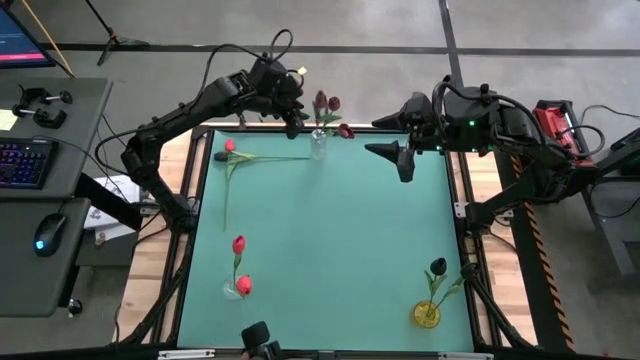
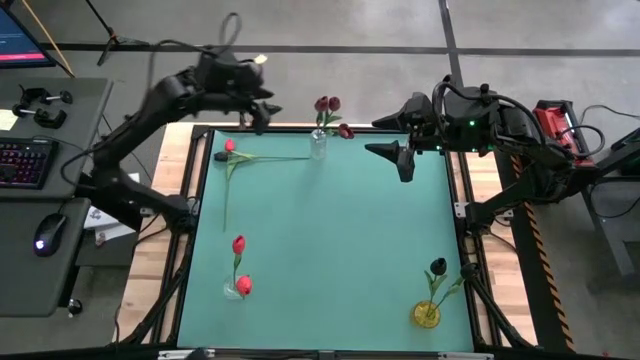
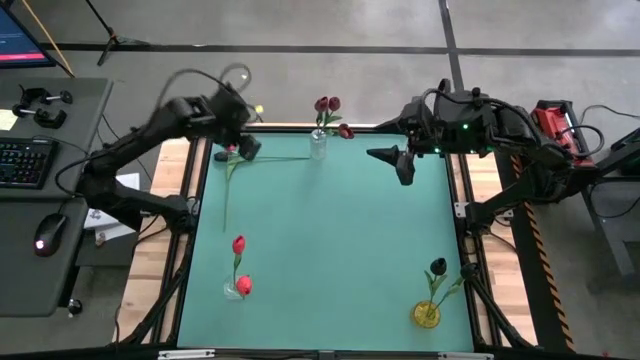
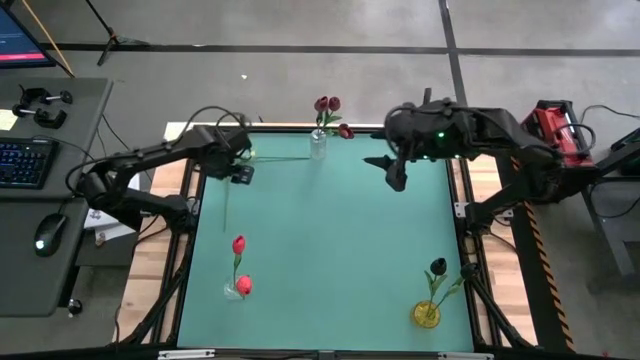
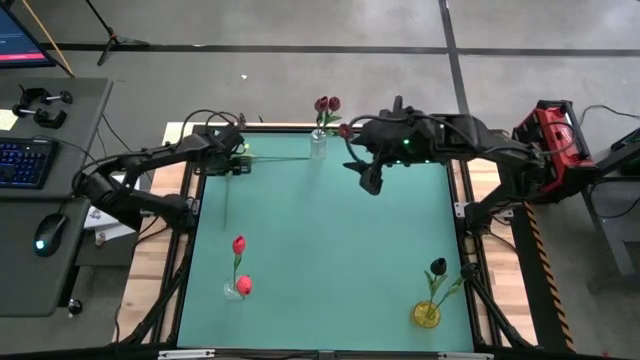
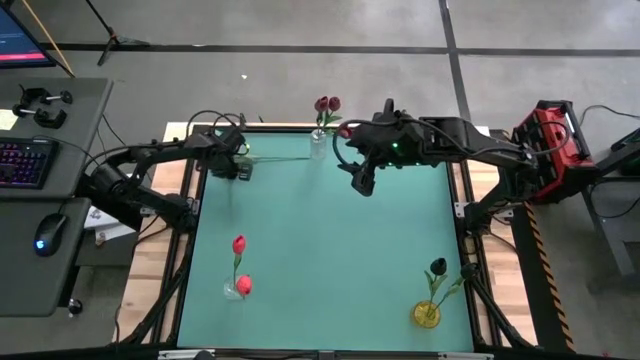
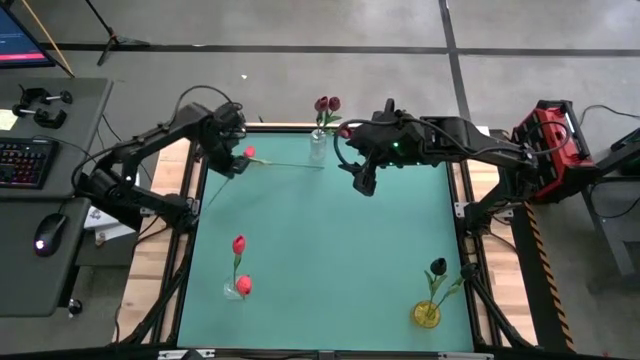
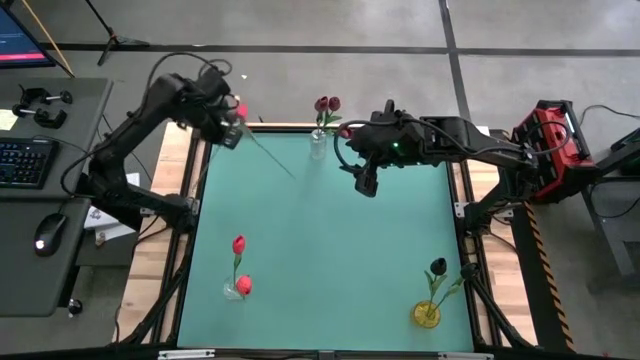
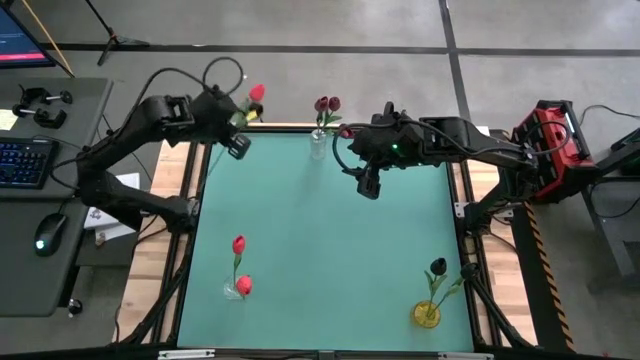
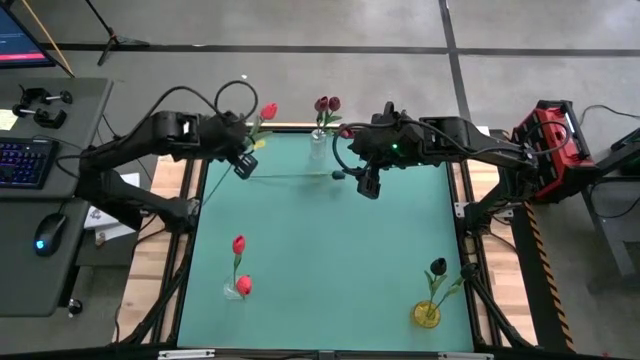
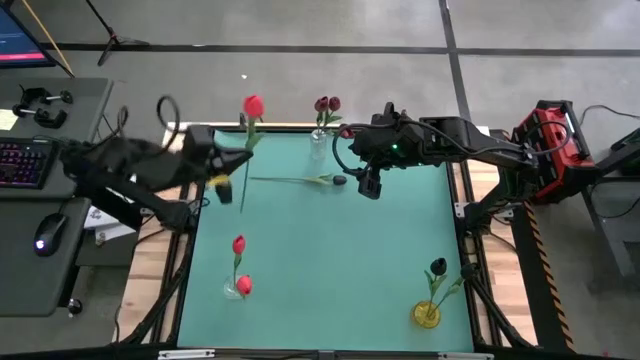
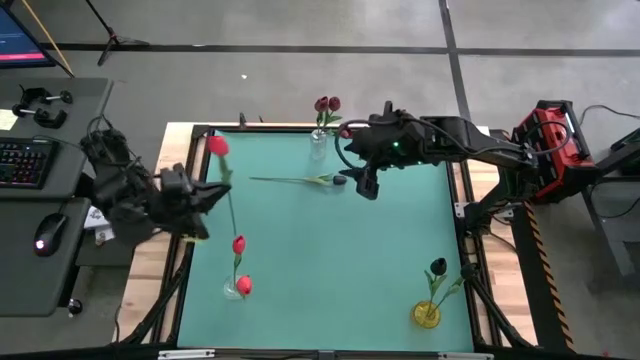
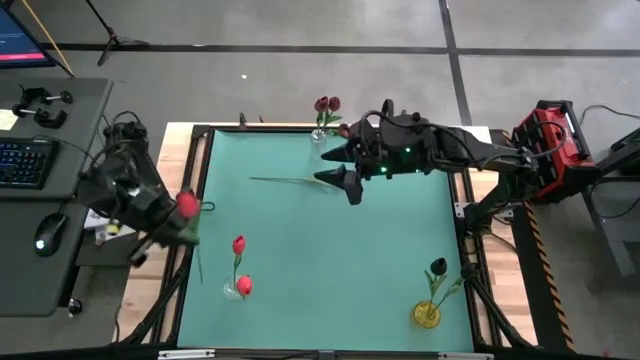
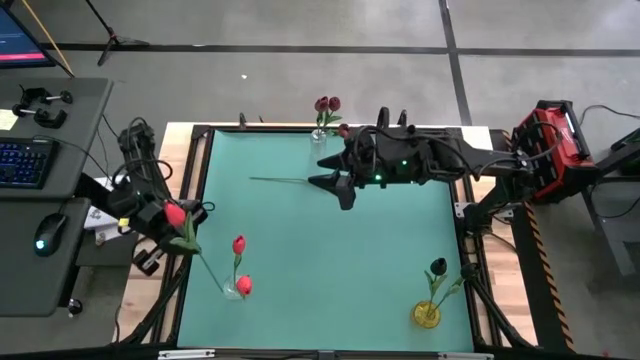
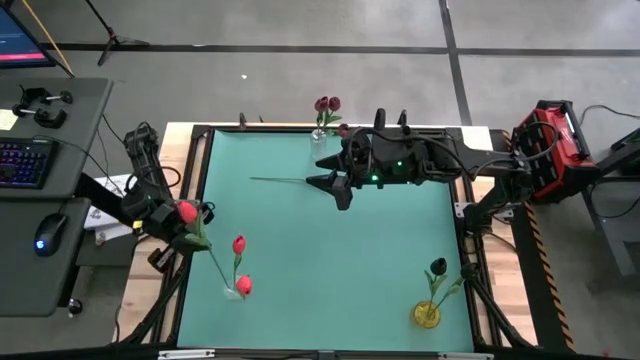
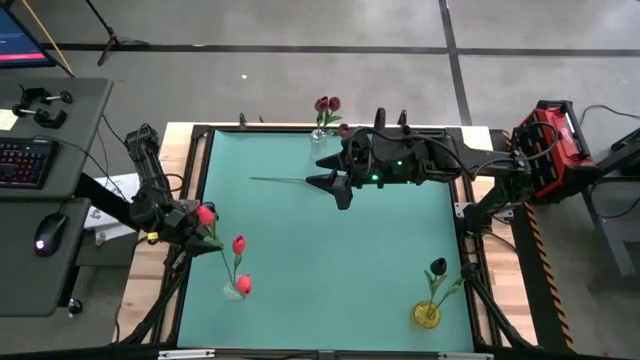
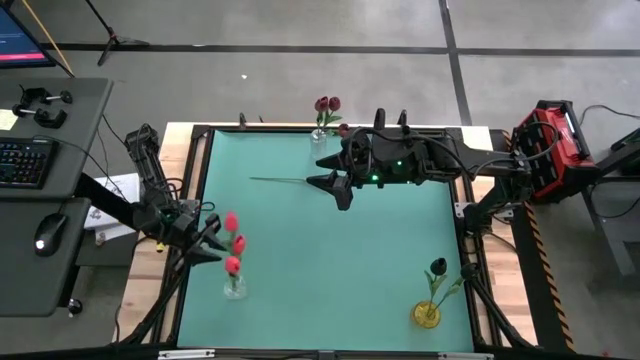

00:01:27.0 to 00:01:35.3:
Task: Sort flowers into vase by color
Put the pink flower into the bottom transparent vase

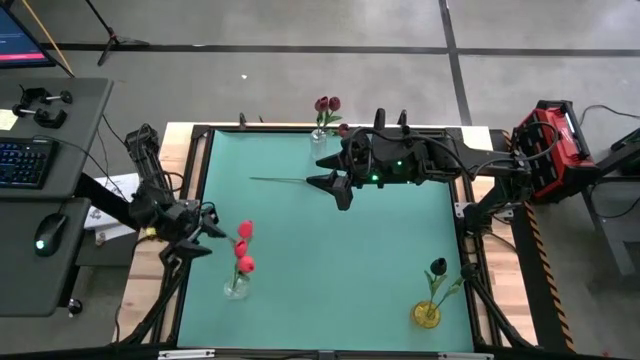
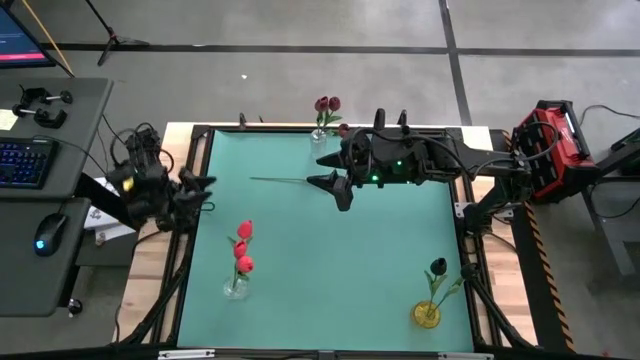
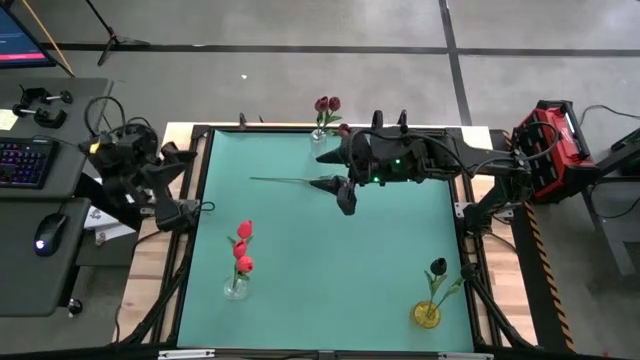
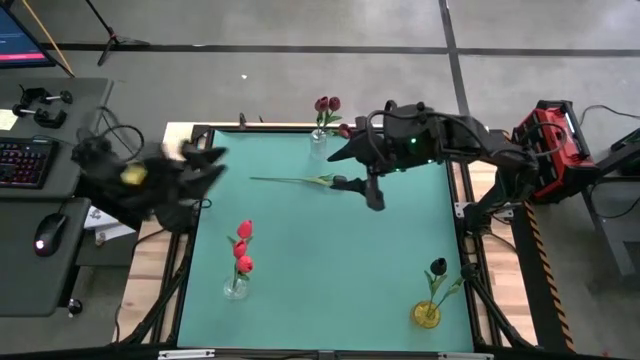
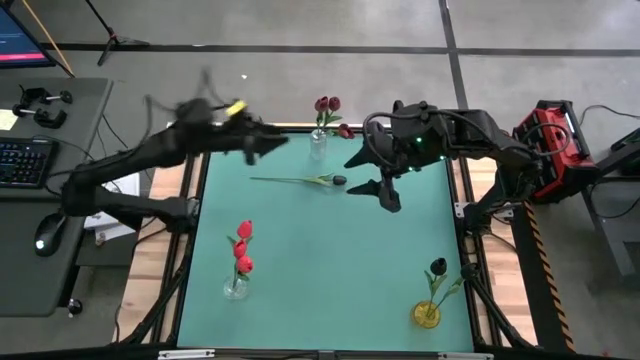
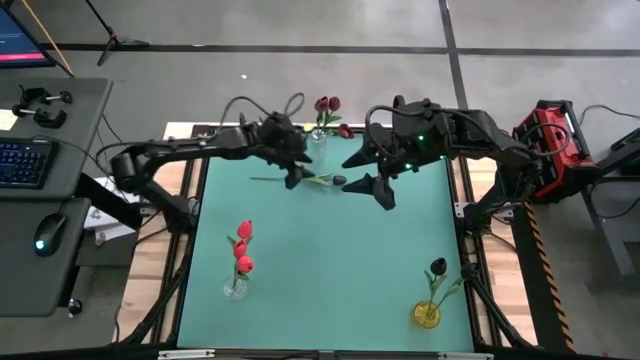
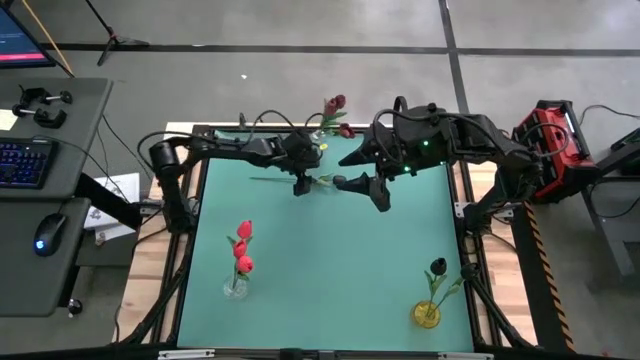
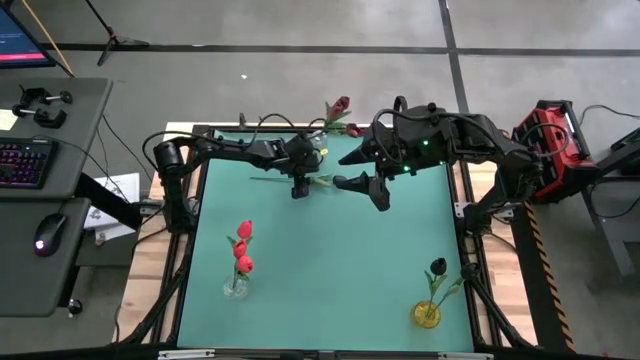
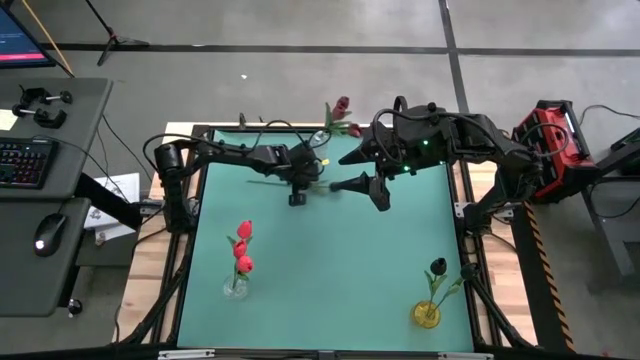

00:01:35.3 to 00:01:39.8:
Put the black flower into the yellow vase

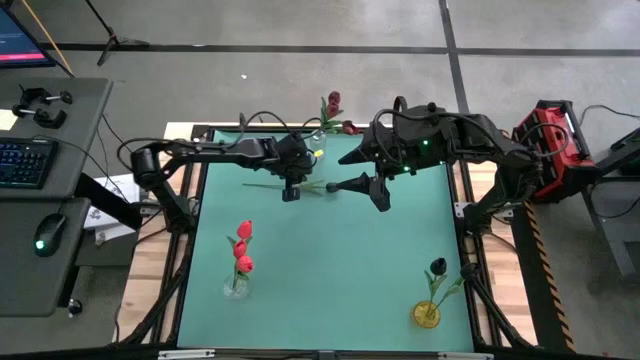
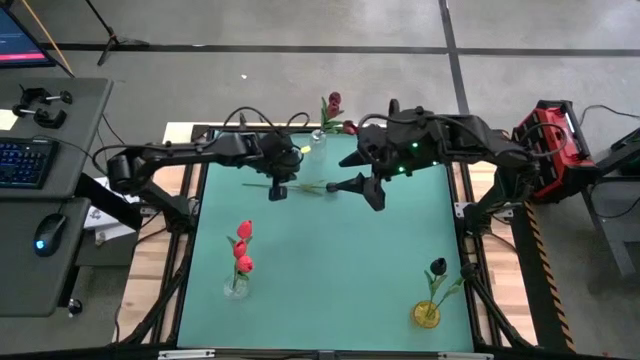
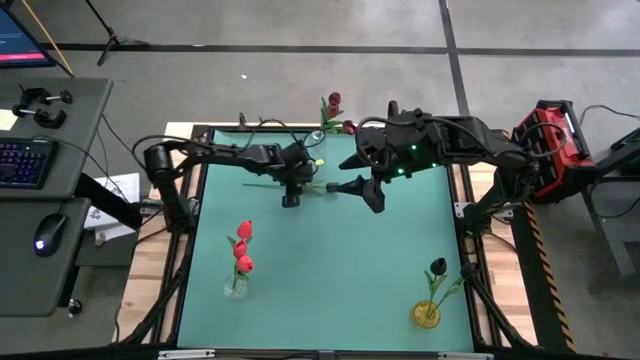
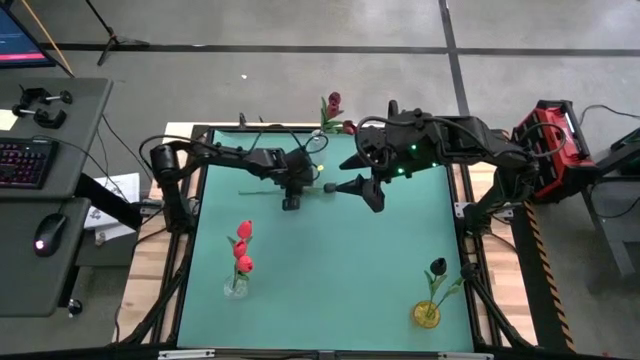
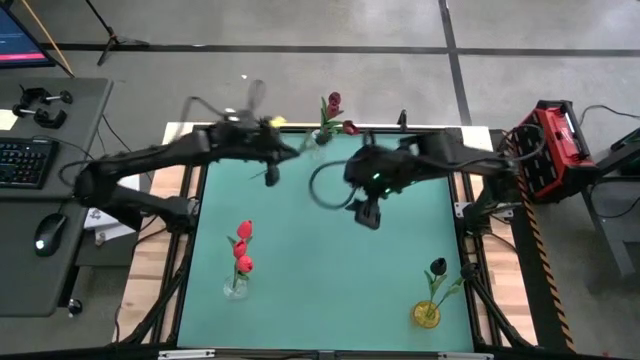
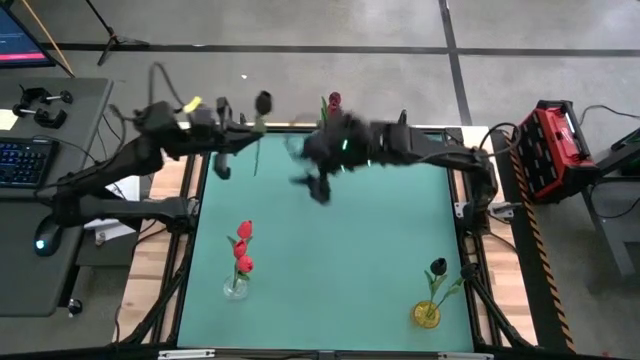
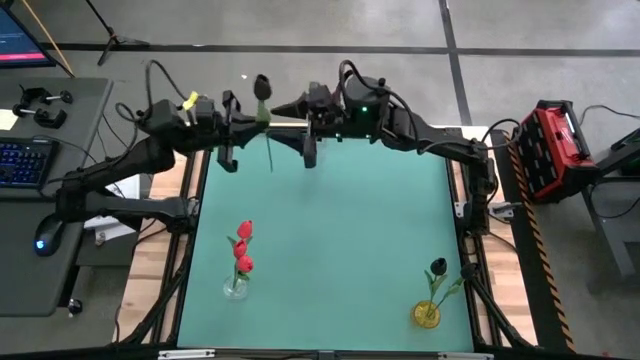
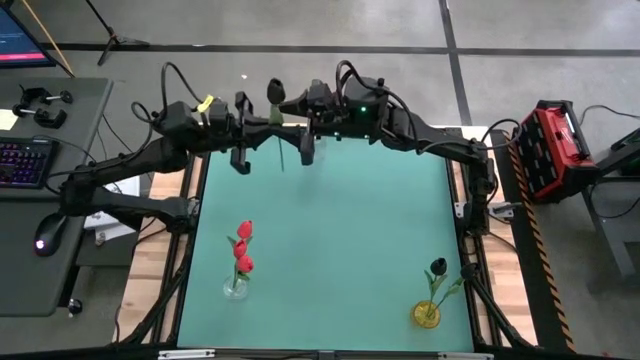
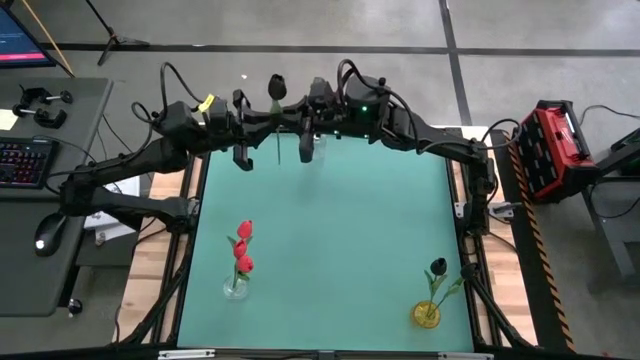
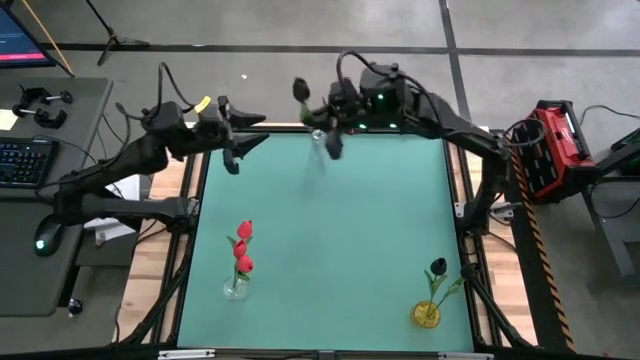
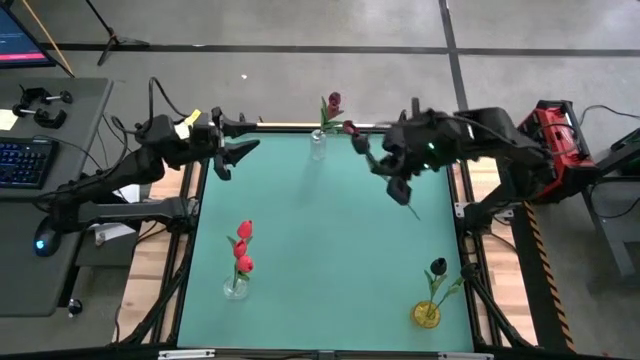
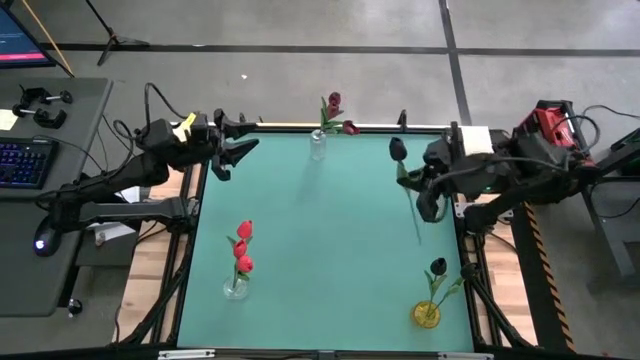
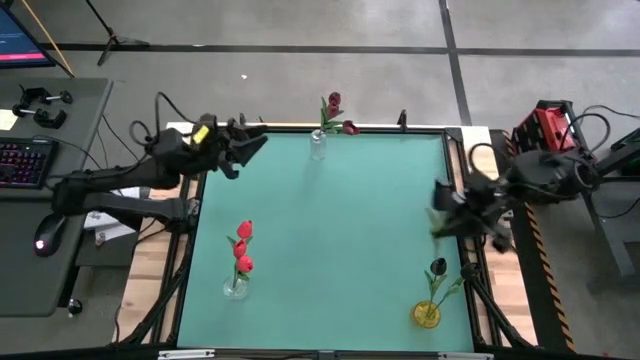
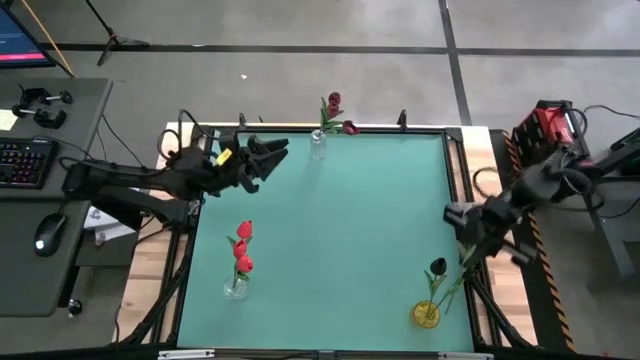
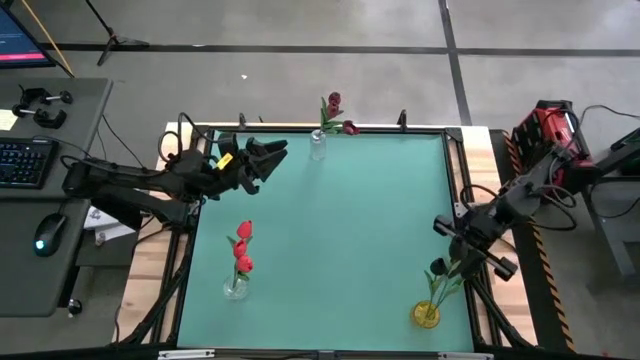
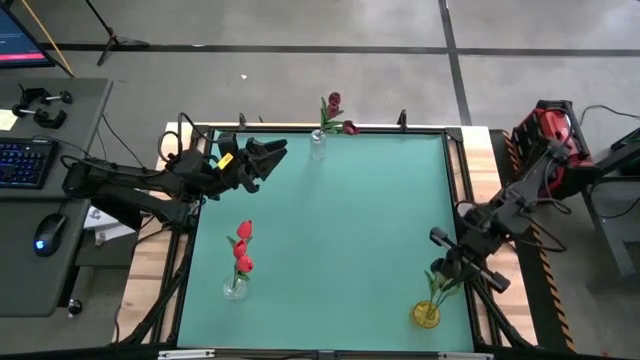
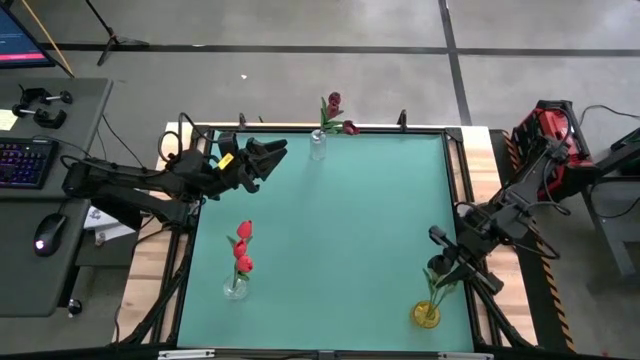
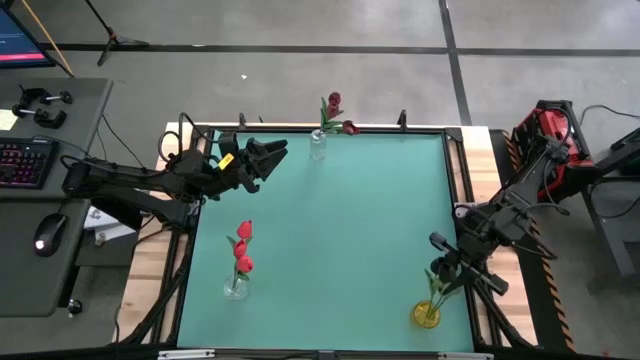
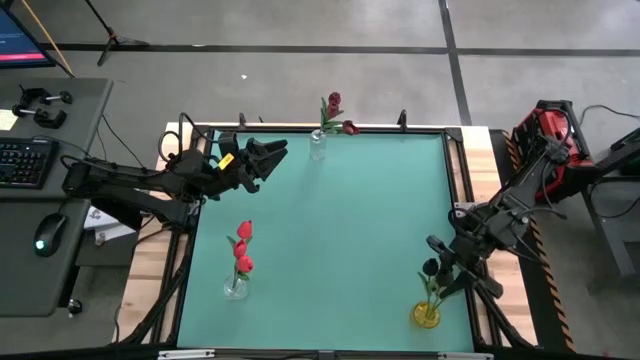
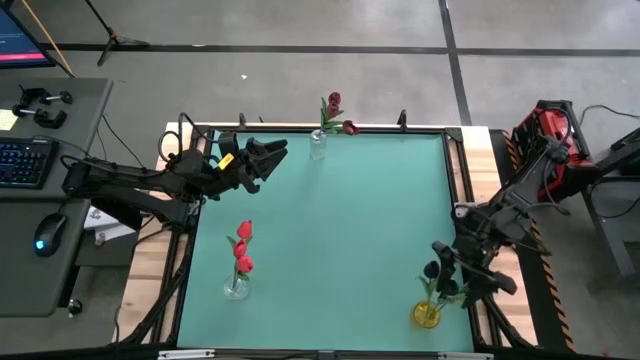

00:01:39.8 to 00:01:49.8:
Put the black flower into the yellow vase
